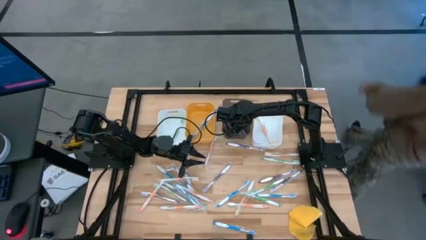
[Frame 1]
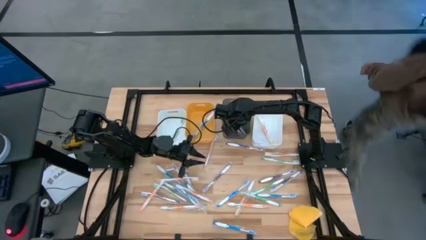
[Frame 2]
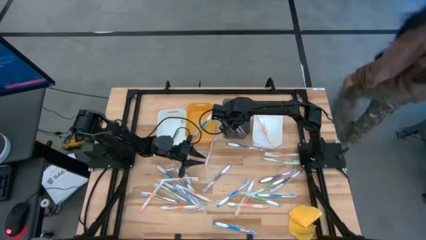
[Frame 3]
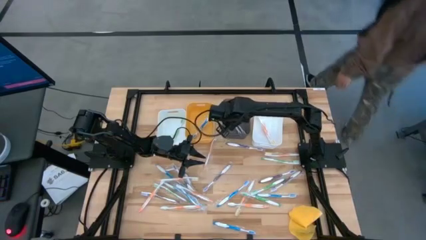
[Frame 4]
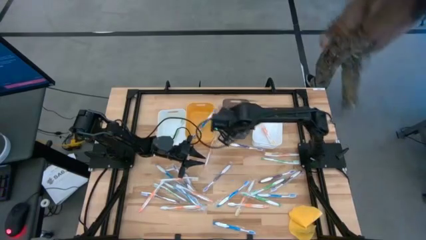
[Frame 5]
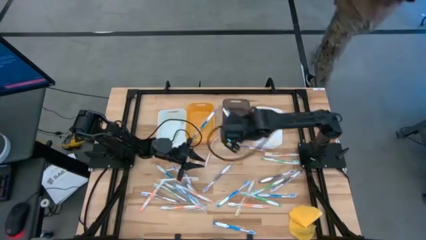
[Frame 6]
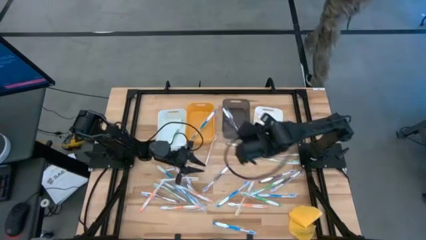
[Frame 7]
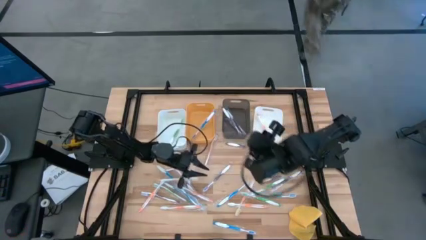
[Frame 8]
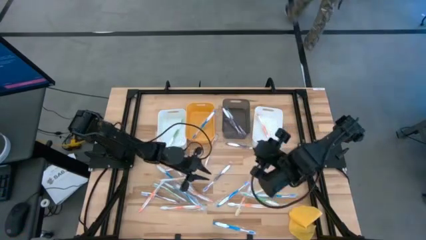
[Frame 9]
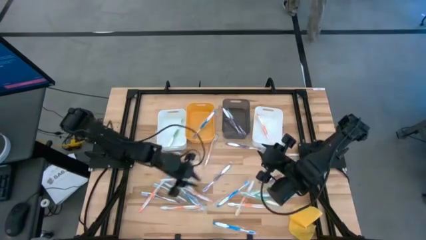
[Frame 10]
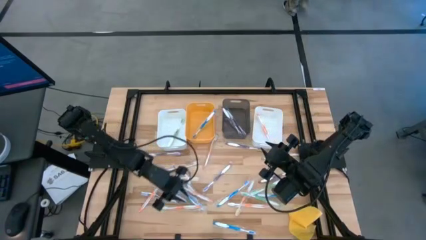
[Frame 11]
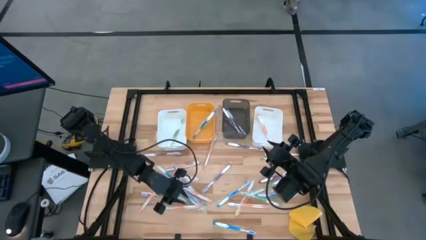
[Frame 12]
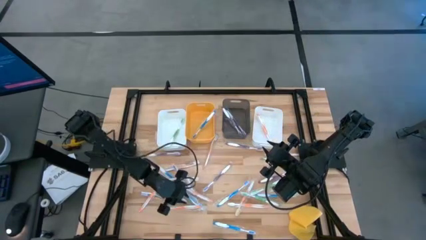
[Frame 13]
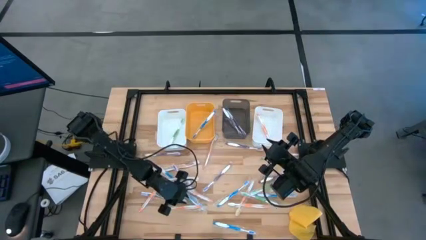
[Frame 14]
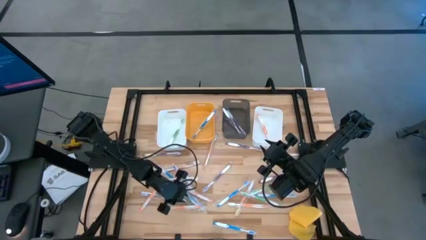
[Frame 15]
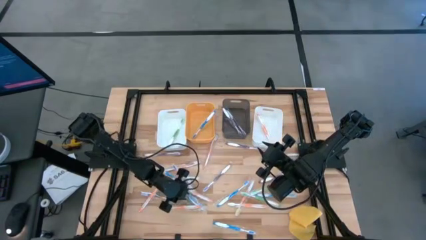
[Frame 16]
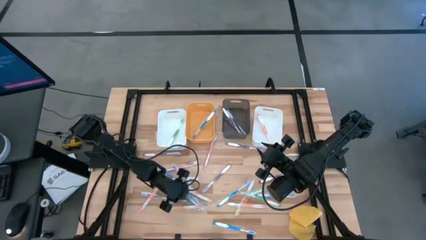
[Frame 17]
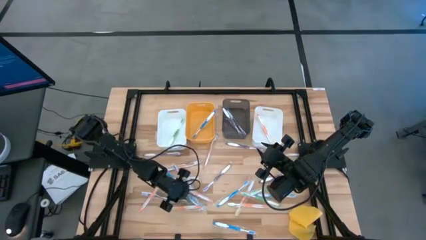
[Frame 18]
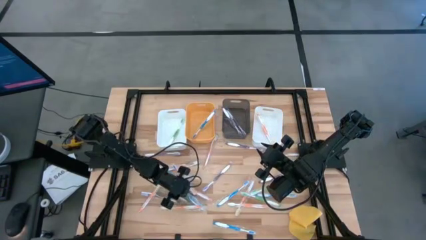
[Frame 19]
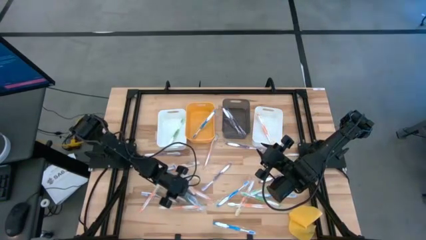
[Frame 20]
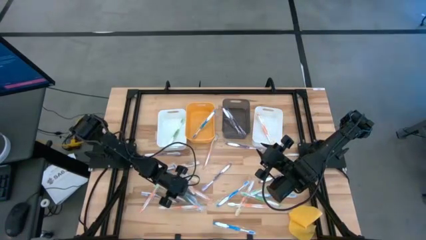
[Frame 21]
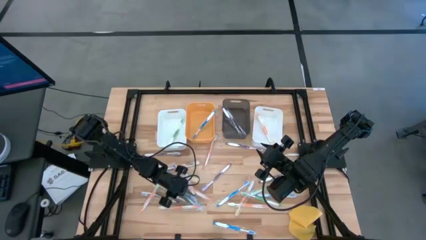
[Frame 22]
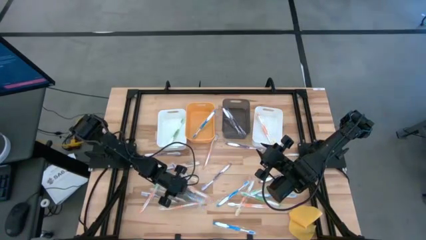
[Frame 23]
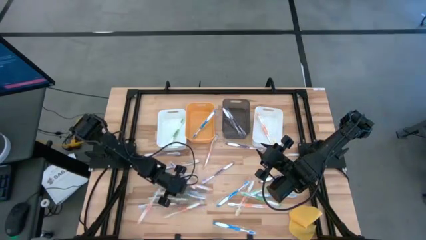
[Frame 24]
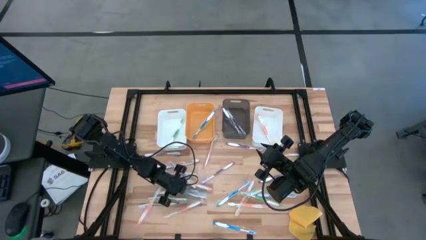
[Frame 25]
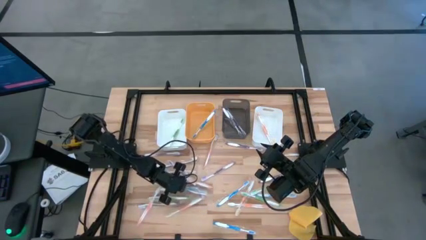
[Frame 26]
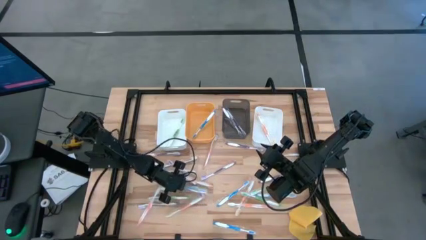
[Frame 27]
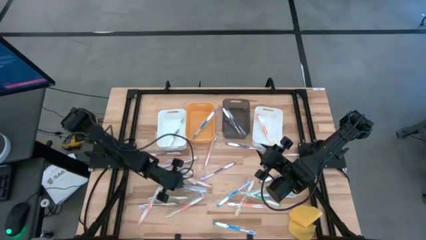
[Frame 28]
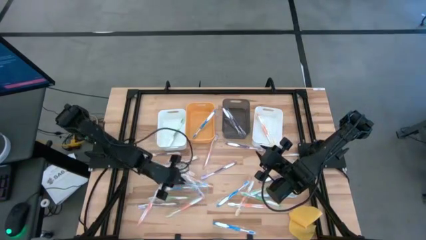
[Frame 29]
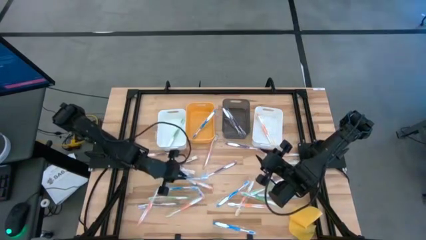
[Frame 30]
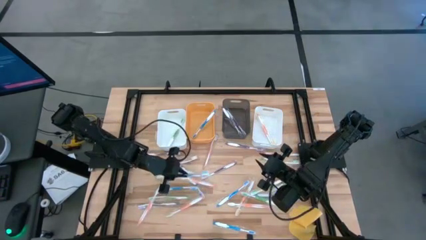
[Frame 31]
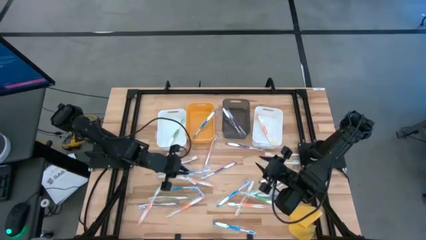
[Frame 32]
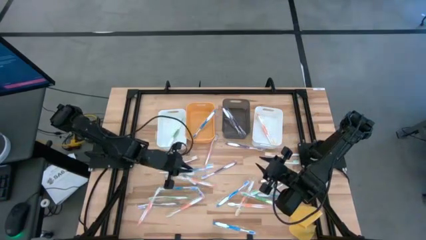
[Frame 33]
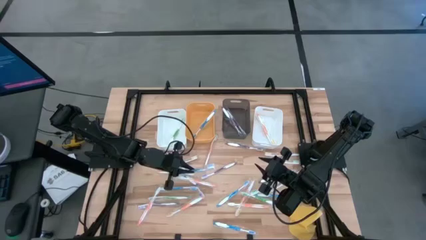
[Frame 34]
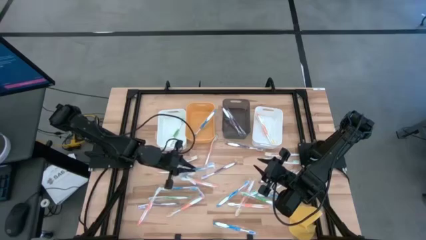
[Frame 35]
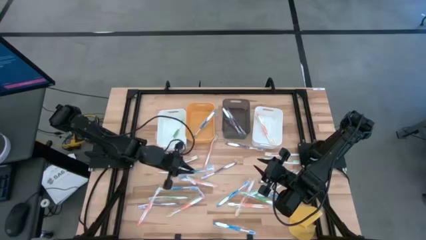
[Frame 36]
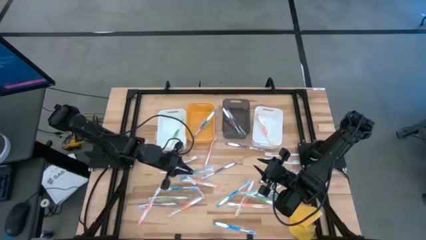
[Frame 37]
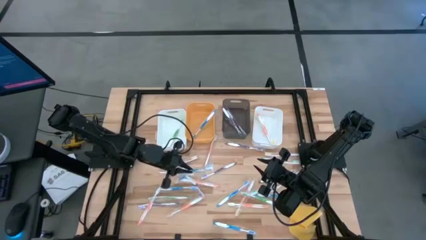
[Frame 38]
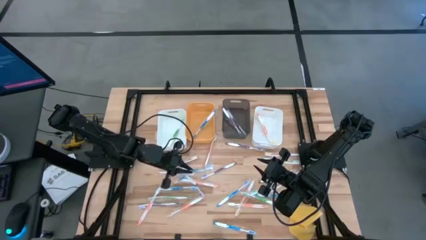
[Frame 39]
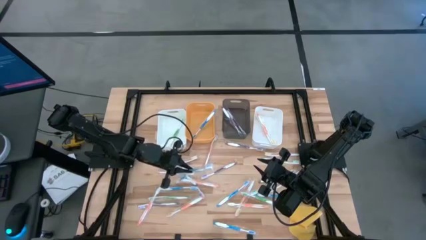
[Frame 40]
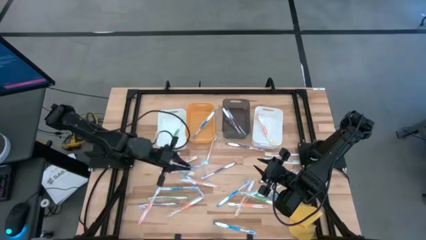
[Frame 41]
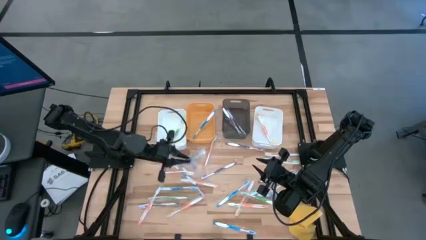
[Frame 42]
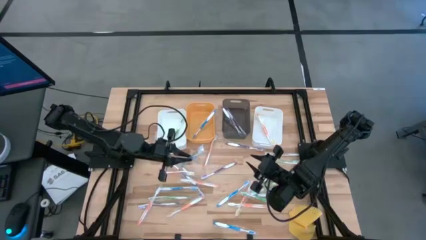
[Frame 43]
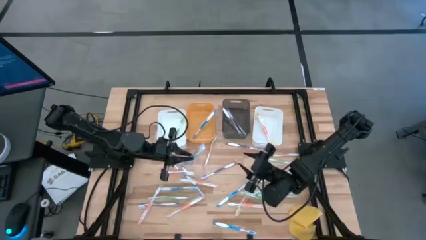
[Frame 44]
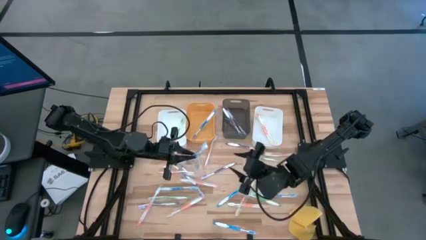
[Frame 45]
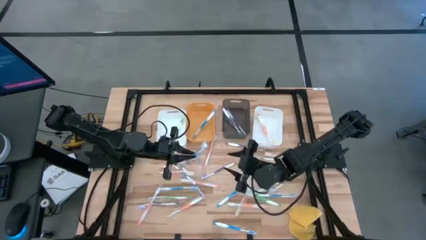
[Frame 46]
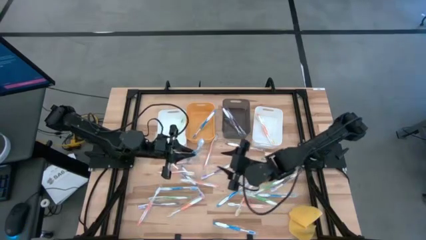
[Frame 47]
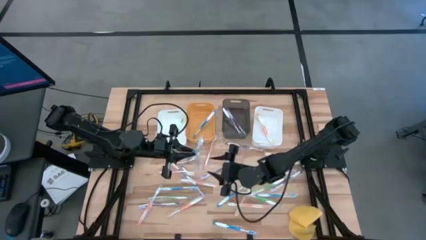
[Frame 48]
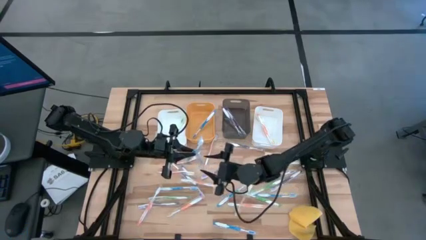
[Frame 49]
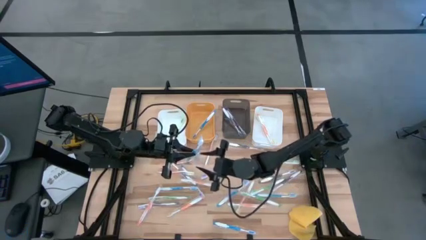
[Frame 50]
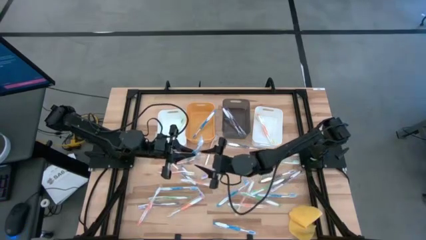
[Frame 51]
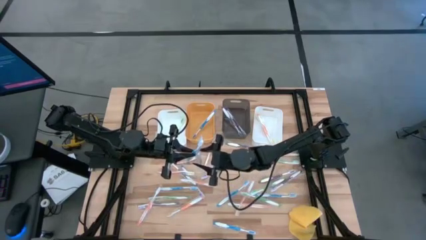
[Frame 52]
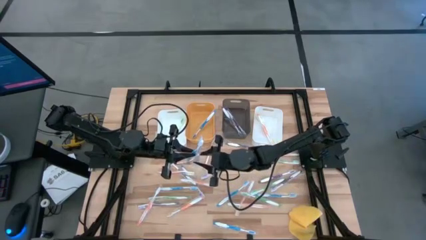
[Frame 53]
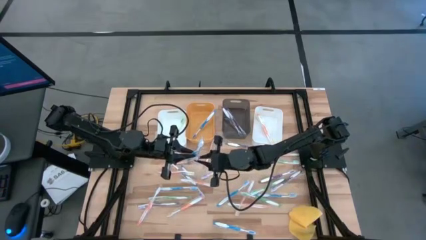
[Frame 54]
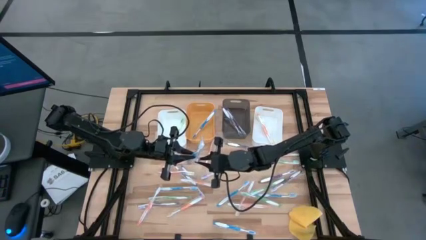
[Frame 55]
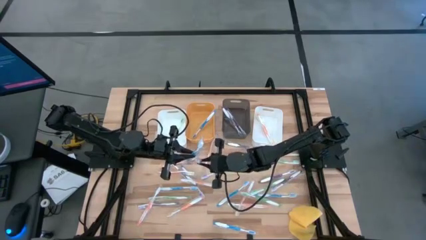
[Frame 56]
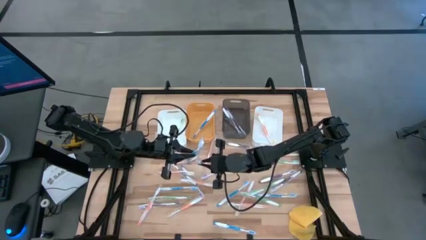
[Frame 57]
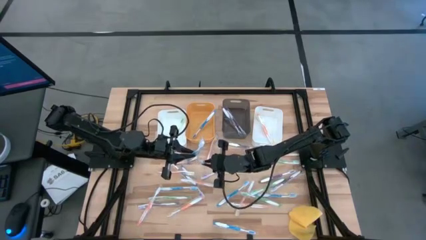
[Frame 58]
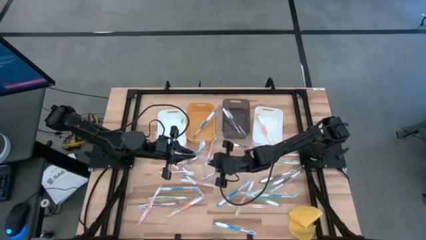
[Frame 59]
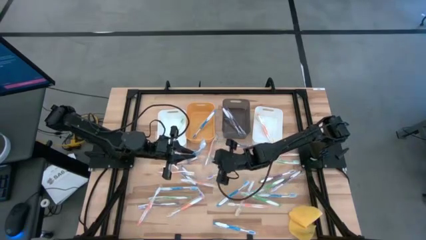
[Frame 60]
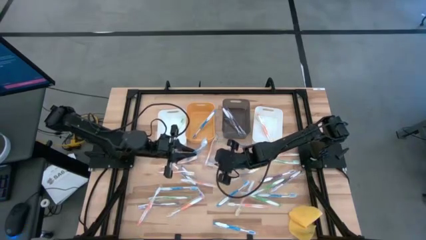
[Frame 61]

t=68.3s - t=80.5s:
Task: Pick & Place Toothbrushes
Put the blue toothbrush into the orange bin

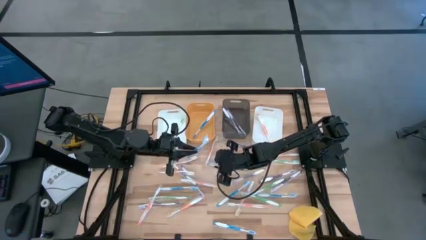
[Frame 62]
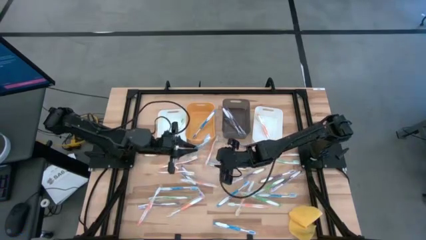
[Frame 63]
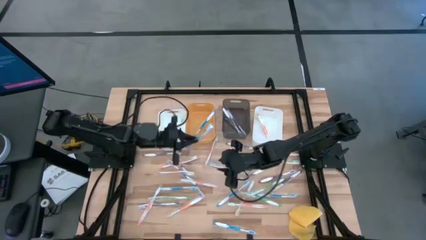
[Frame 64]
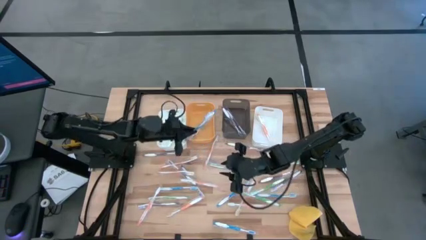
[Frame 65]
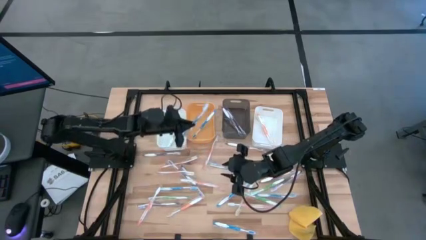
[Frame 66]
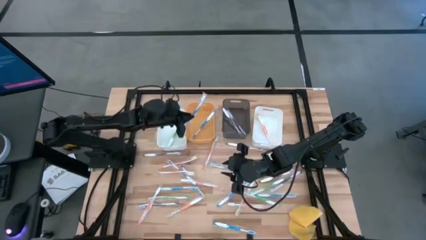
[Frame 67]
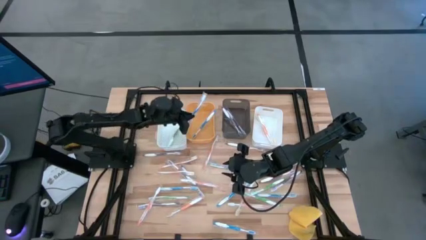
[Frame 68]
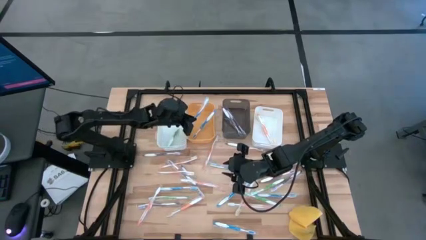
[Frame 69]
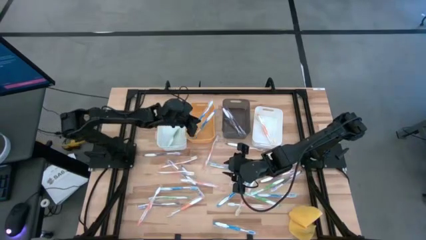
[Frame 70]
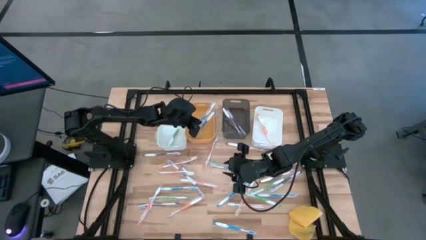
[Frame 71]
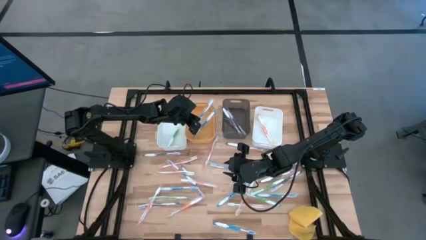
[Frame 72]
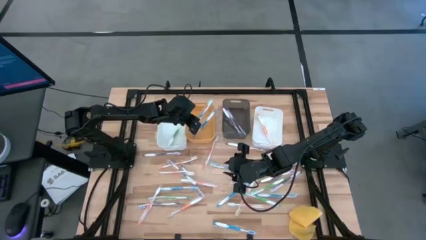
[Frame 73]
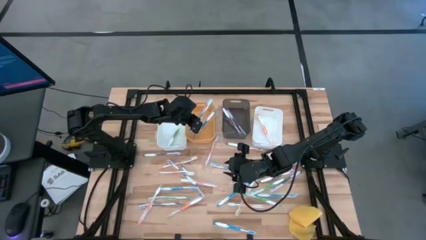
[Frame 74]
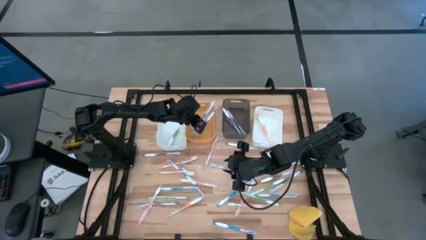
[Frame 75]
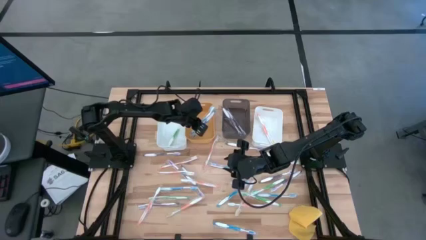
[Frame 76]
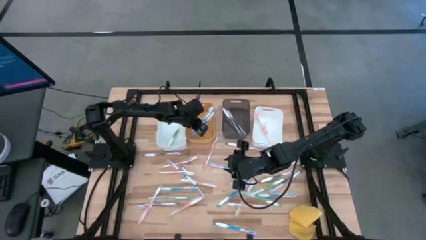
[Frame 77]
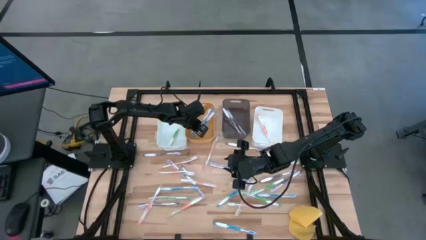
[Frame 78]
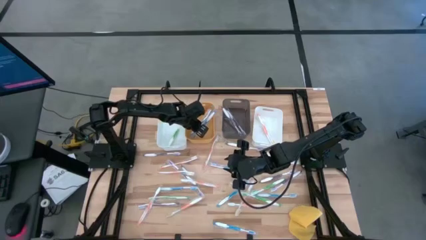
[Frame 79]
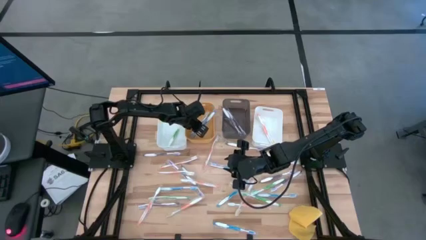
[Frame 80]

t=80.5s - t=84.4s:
Put the blue toothbrush into the orange bin
